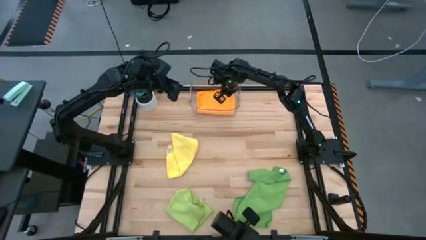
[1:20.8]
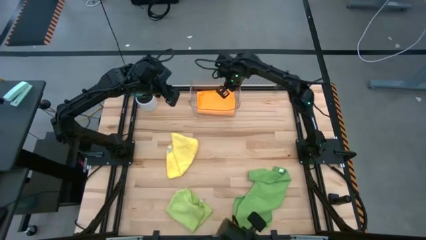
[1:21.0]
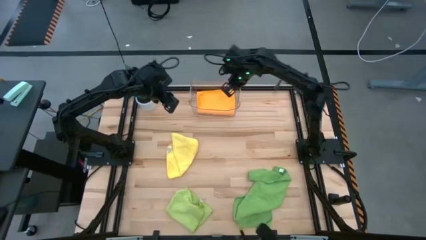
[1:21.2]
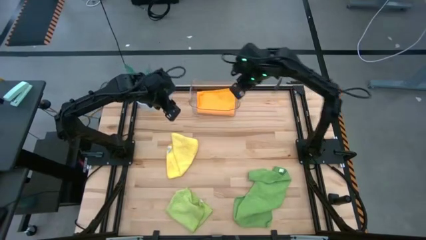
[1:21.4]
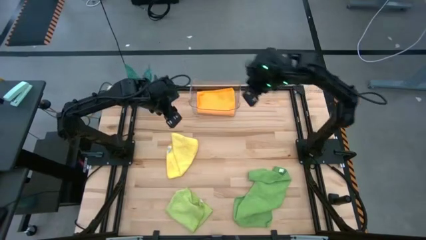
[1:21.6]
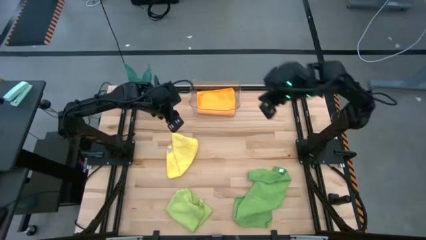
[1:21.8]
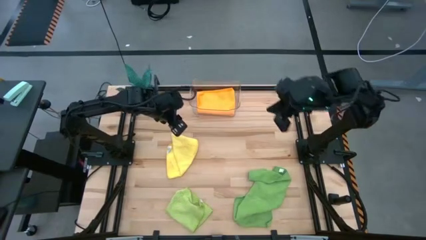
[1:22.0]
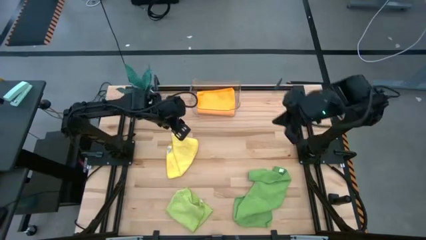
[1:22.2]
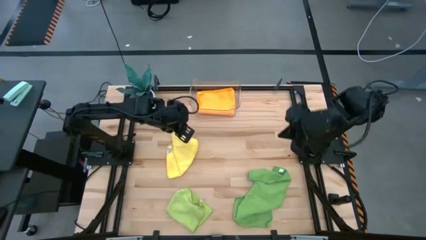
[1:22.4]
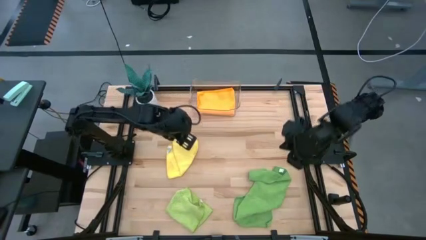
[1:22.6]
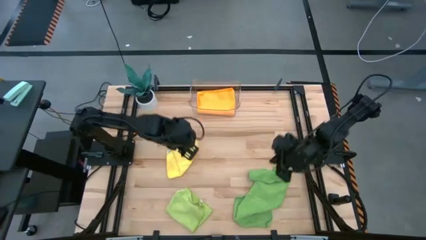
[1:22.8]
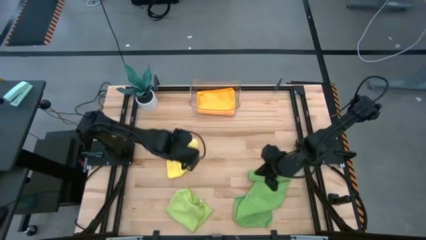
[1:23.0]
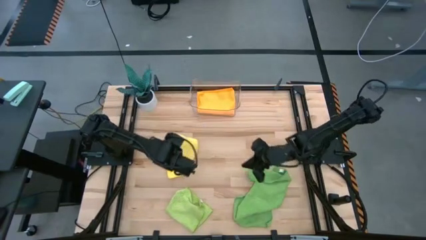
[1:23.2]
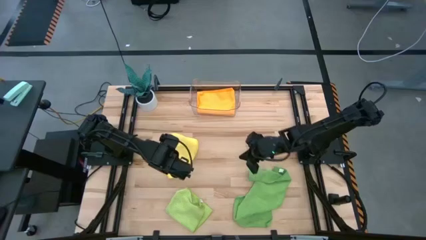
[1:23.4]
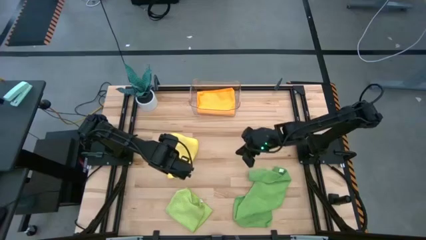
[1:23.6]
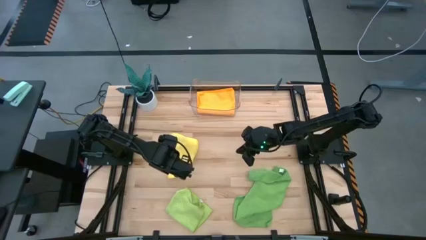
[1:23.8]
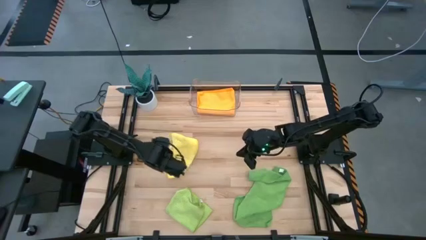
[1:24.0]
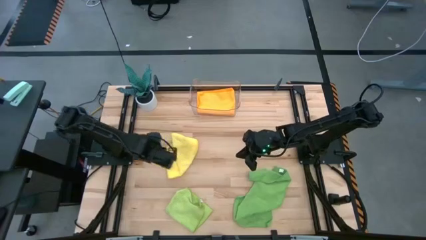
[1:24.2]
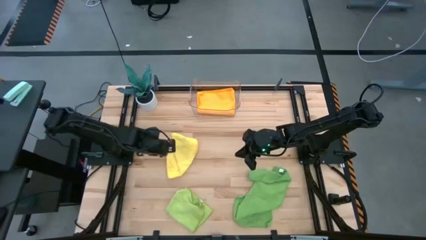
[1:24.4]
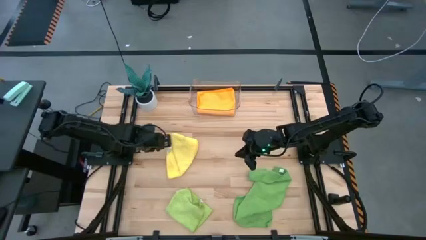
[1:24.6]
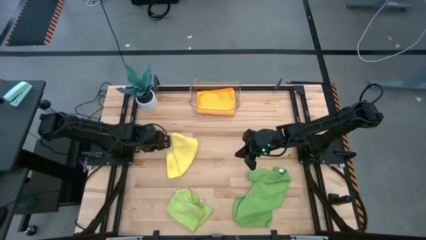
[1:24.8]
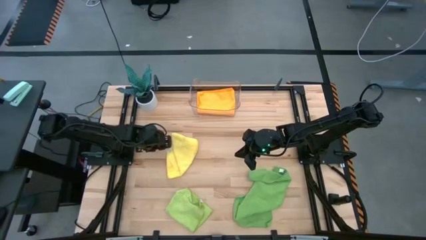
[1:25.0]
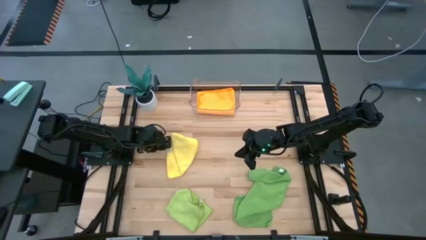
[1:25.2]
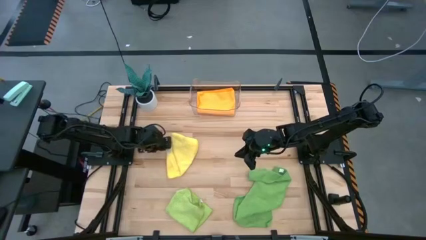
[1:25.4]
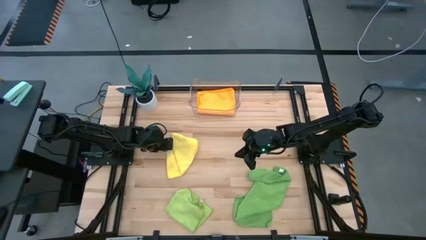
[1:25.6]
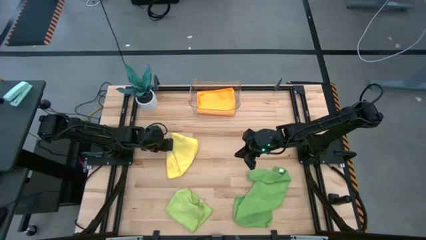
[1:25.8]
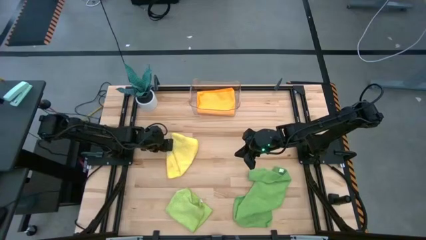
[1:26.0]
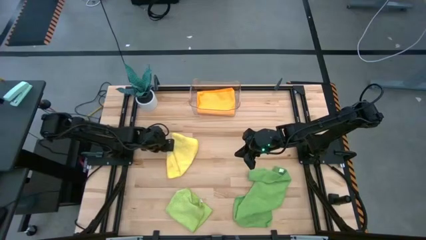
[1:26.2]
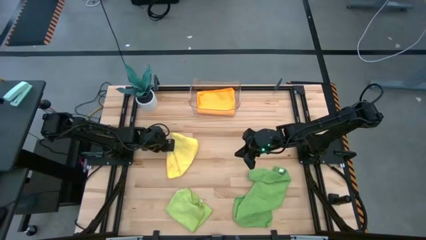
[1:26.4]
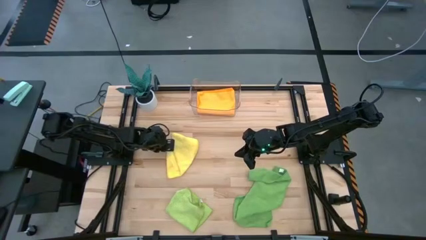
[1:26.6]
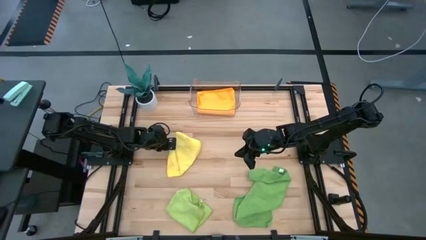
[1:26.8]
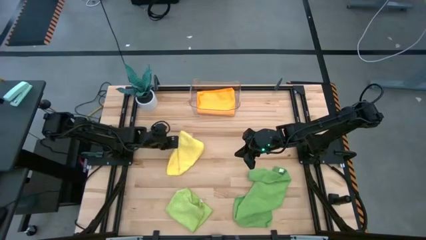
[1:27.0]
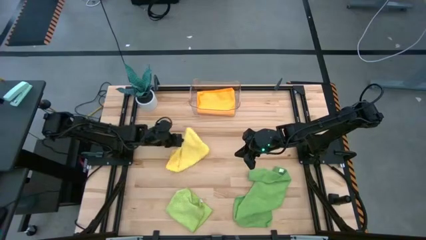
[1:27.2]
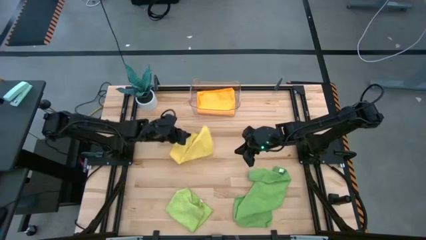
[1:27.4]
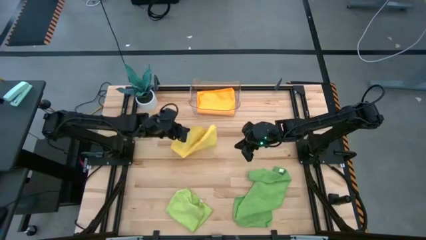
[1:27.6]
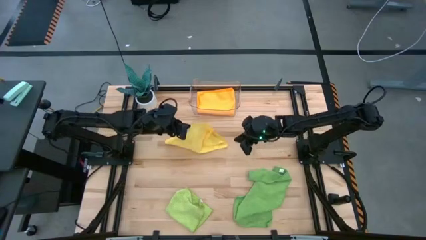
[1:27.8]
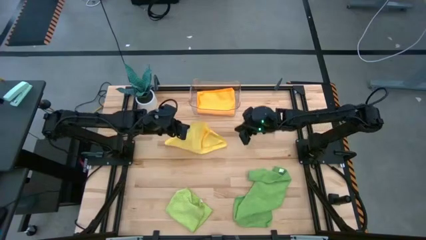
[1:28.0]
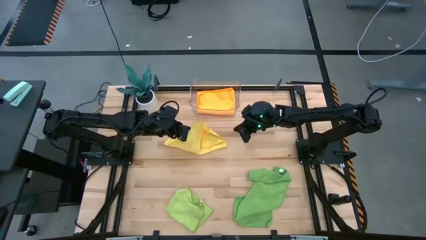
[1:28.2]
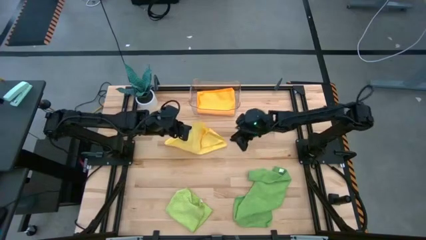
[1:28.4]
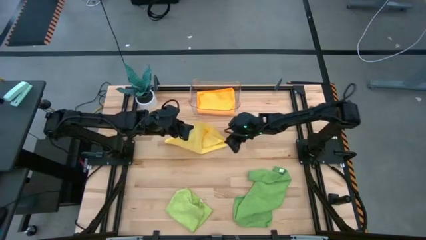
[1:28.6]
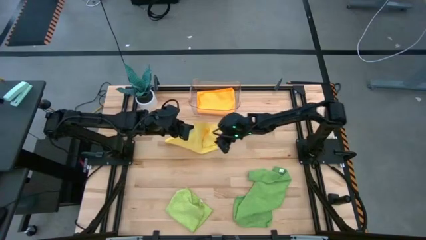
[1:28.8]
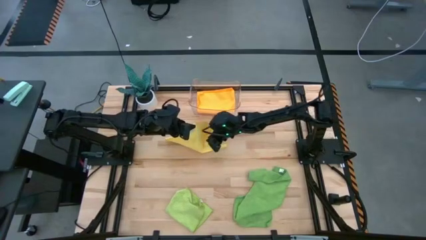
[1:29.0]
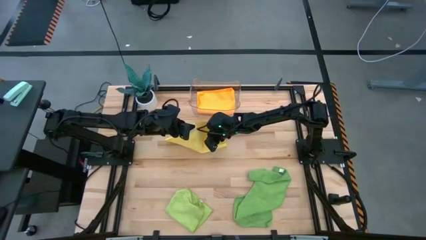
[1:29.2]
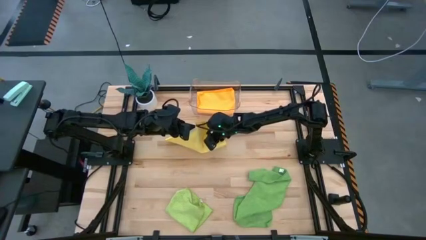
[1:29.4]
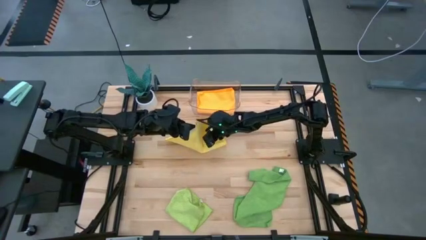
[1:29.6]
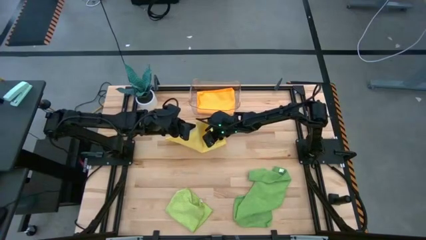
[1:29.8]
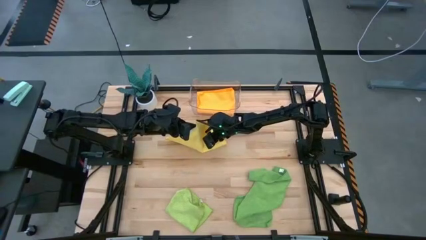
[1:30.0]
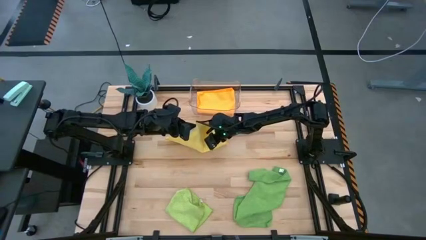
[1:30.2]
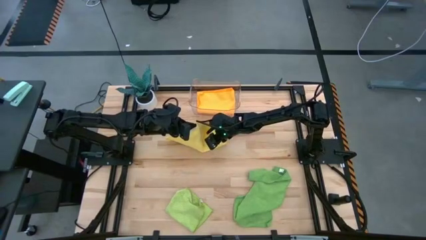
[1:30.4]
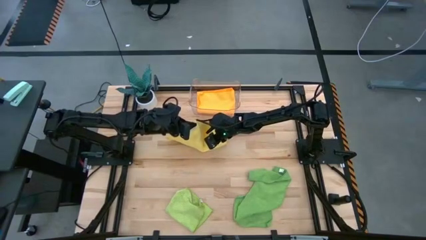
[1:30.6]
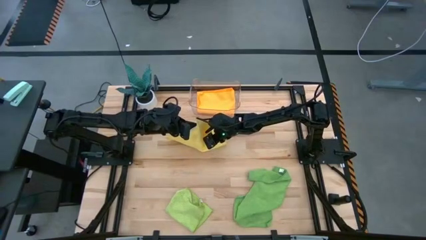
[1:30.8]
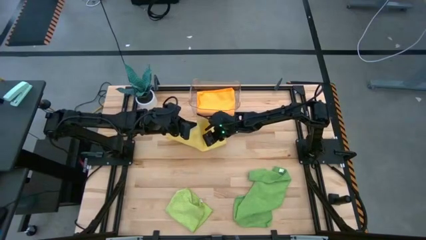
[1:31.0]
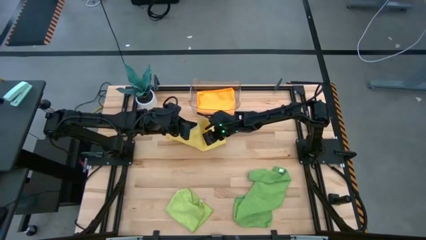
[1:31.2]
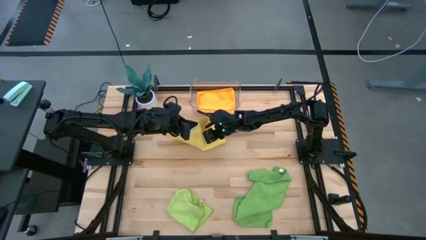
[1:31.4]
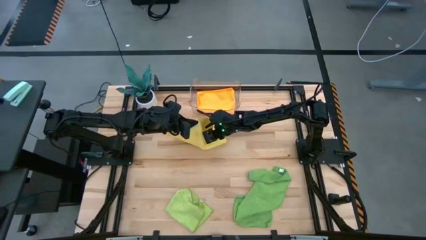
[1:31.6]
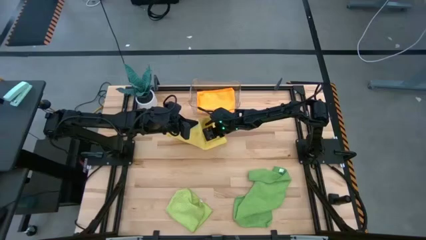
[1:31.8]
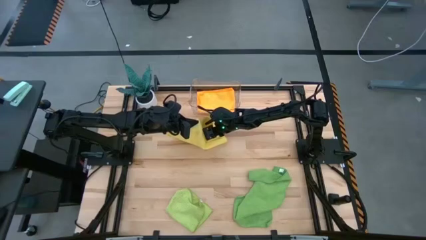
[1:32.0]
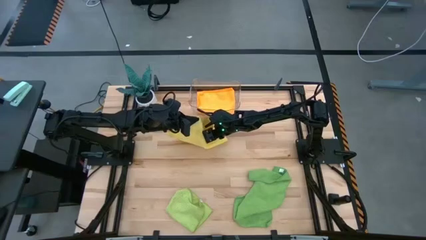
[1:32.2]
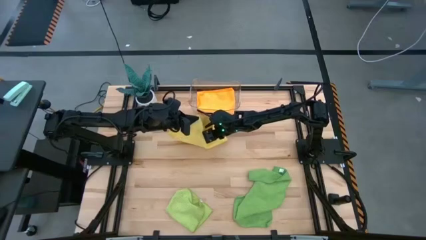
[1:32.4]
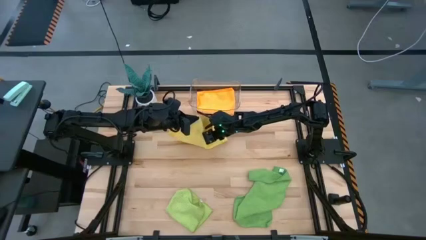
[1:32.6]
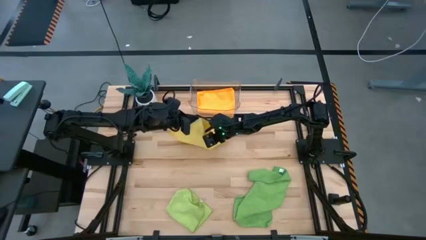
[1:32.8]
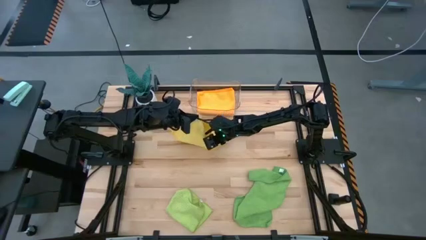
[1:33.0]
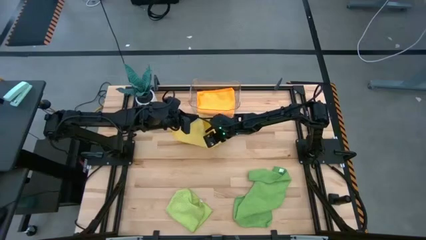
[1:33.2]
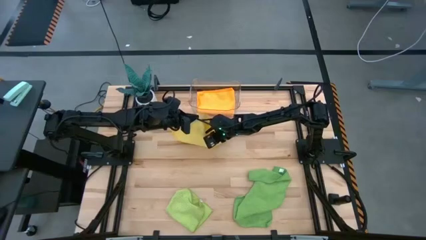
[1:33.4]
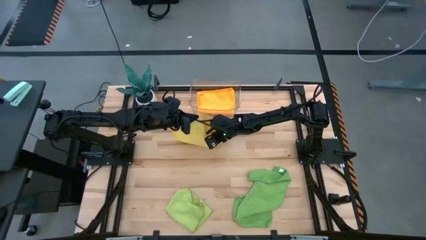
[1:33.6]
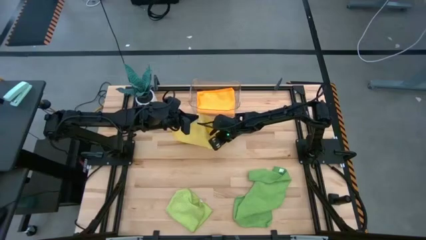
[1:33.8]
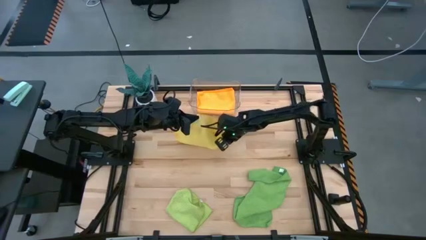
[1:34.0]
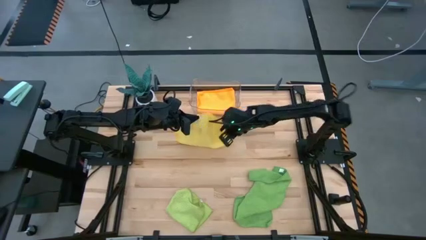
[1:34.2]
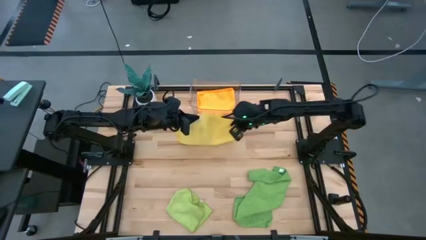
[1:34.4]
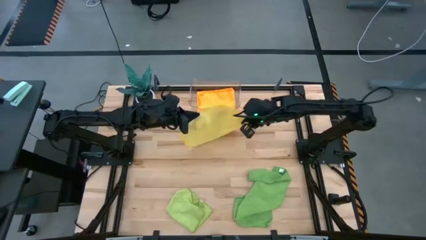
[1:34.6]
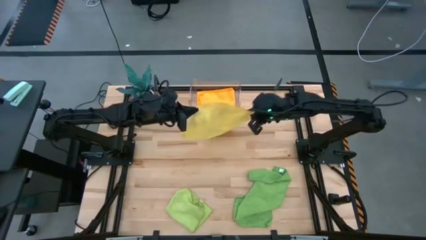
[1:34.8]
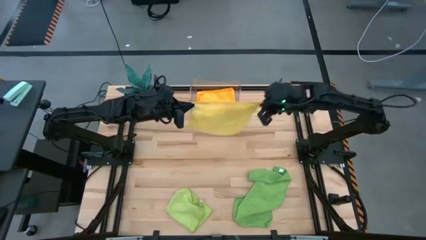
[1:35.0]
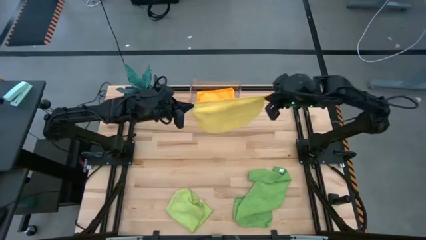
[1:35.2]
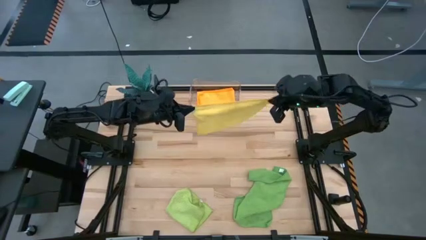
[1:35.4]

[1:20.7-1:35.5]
Task: Fold microfiber towels
Fold the yellow towel
